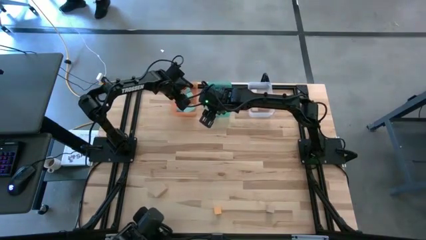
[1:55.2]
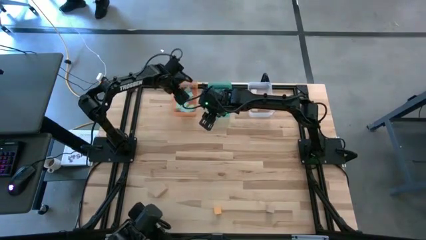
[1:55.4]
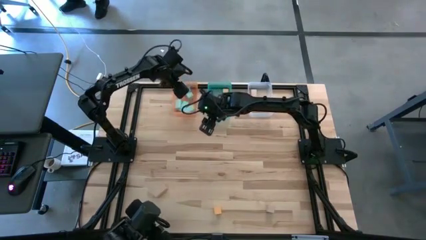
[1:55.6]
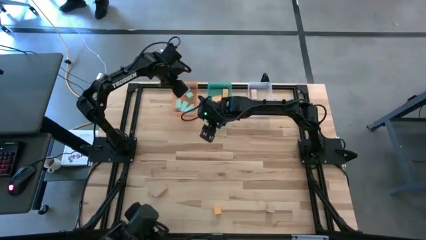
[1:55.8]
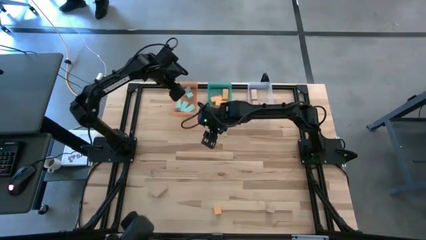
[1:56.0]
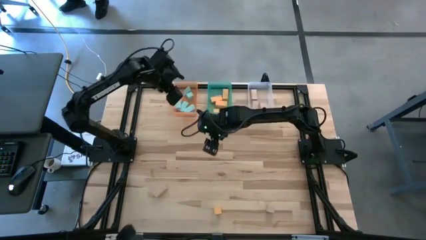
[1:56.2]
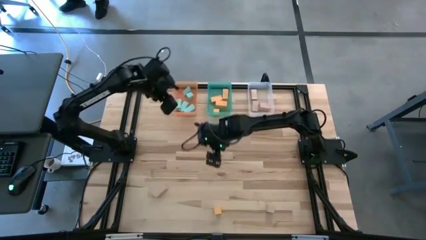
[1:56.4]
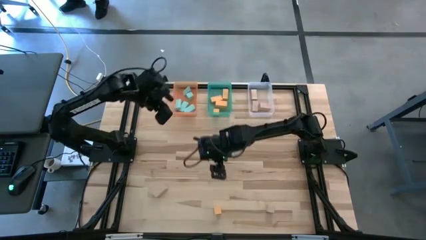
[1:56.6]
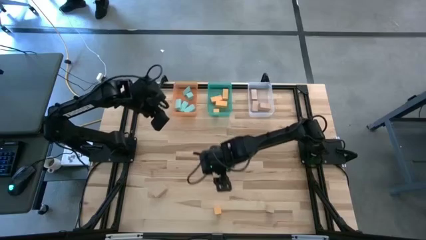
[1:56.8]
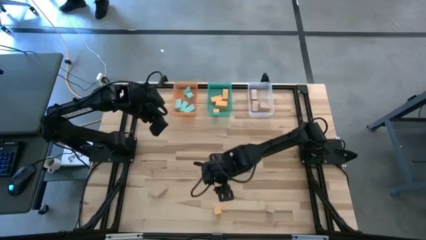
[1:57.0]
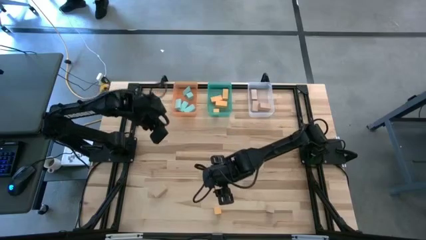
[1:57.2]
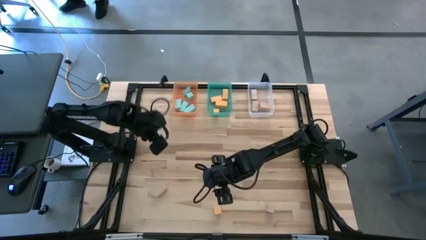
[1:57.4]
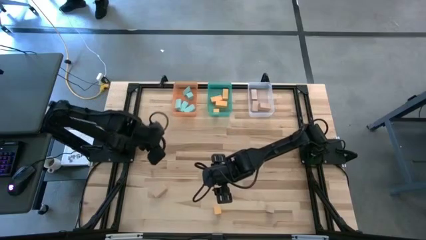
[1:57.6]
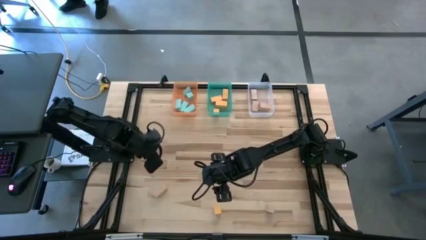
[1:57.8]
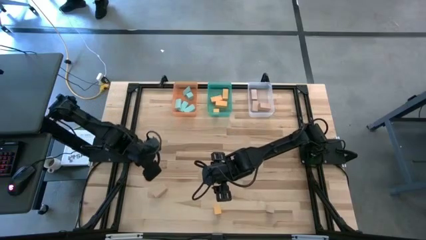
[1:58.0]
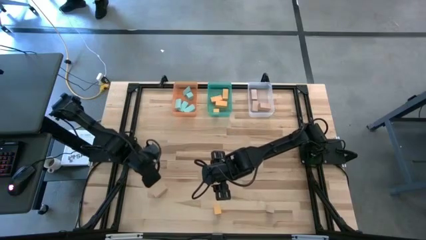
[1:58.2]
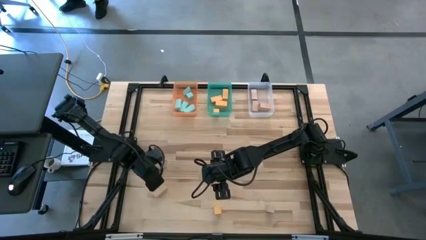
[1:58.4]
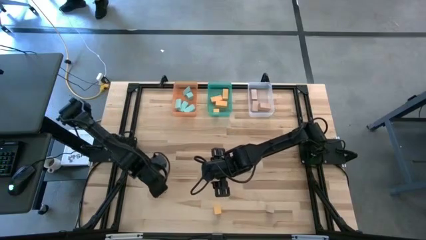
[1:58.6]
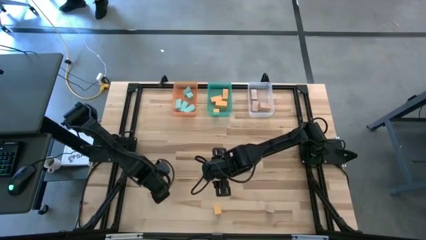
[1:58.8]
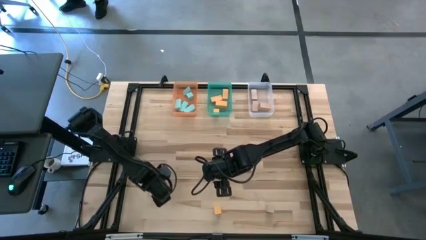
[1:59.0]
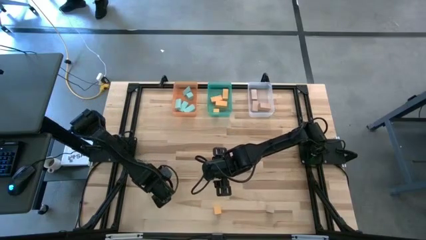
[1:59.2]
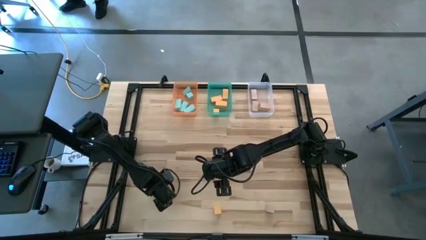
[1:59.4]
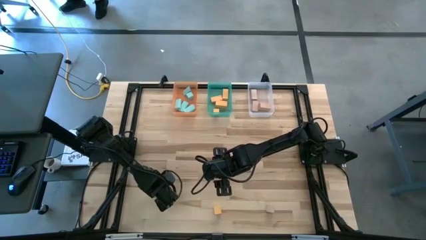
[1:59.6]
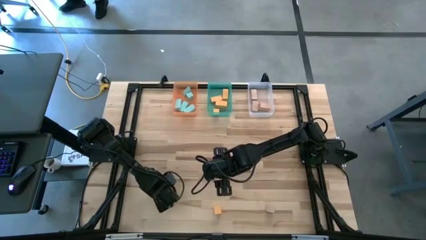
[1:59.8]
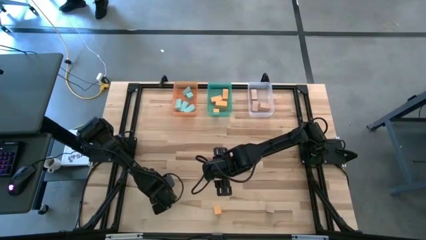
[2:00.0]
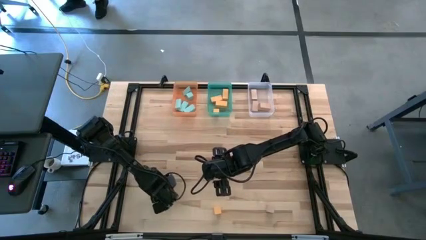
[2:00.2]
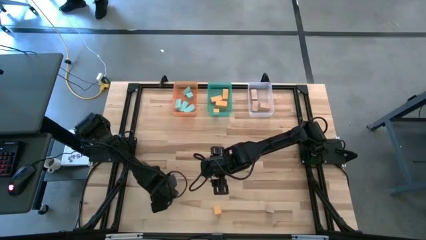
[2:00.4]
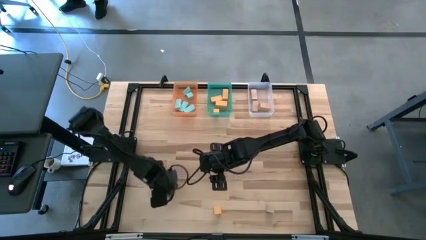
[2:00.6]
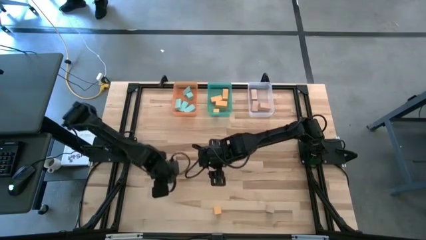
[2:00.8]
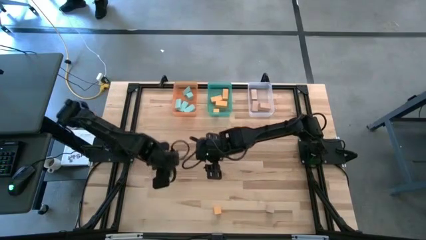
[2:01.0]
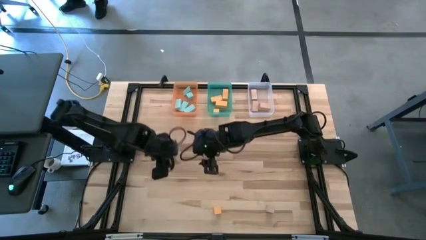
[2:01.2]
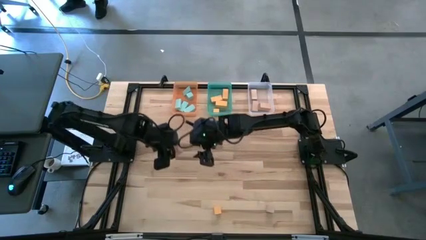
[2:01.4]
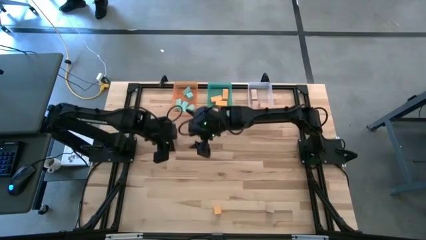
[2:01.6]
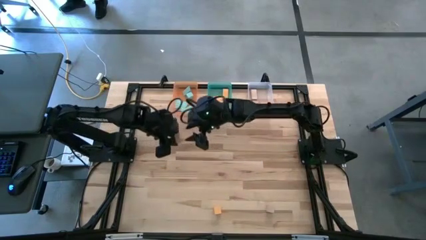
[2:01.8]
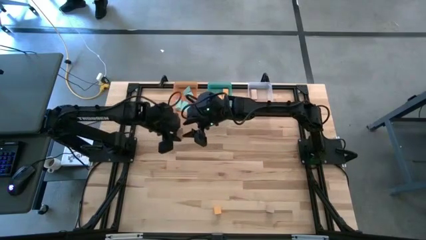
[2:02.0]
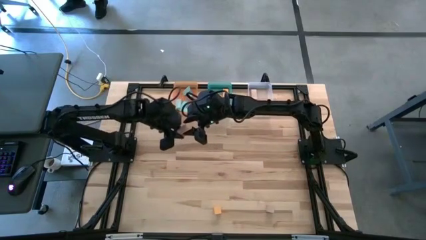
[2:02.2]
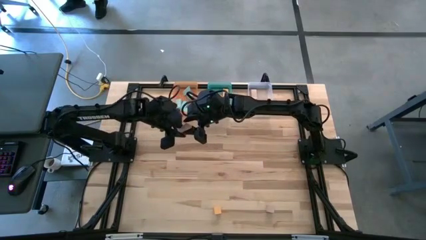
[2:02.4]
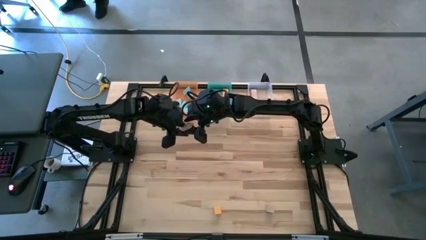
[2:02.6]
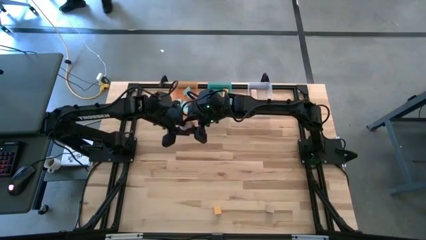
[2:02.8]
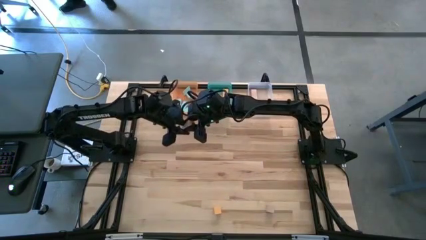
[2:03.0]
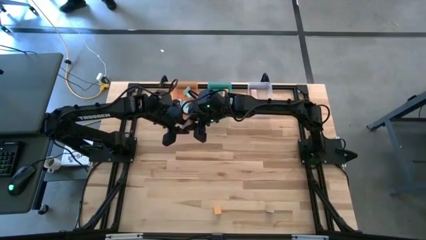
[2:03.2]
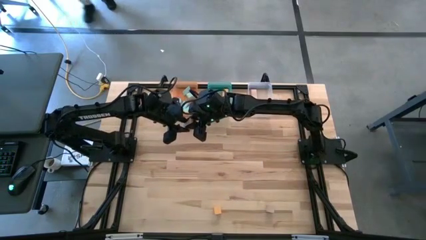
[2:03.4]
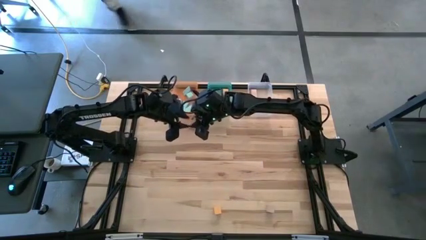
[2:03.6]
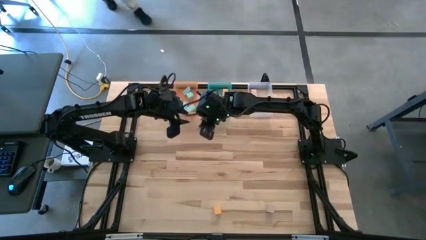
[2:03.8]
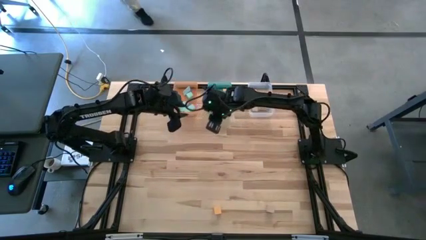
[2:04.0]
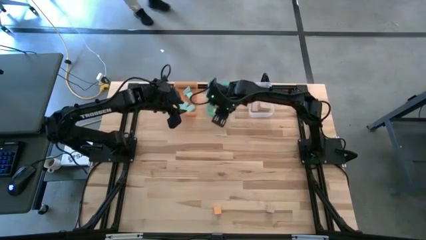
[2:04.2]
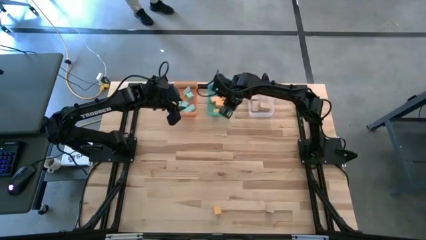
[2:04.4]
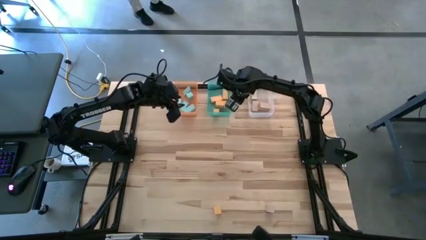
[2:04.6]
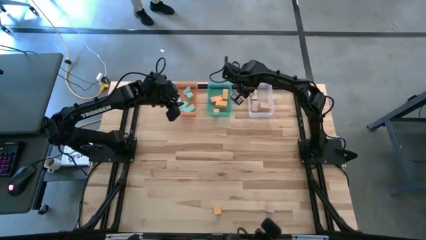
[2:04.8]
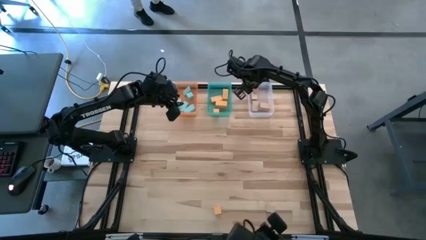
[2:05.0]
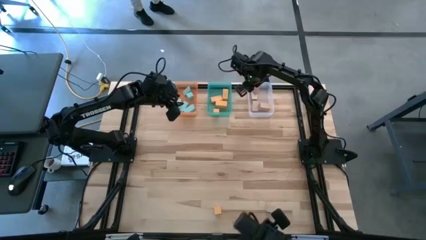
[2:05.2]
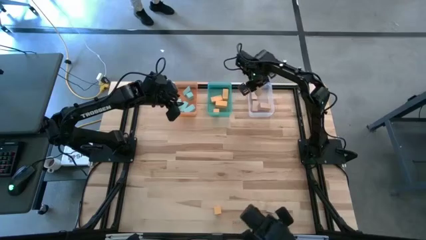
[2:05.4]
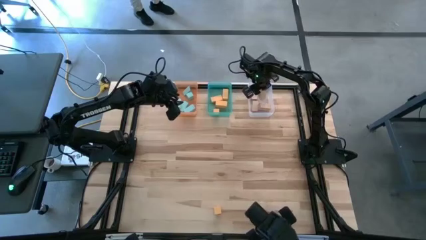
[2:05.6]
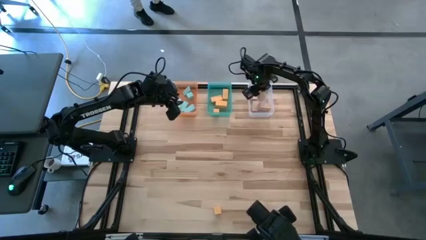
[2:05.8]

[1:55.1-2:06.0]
Task: Sort & place blocks by color
Put the brown block into the transparent bin

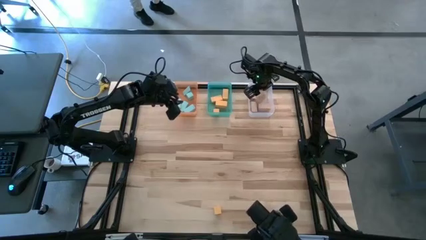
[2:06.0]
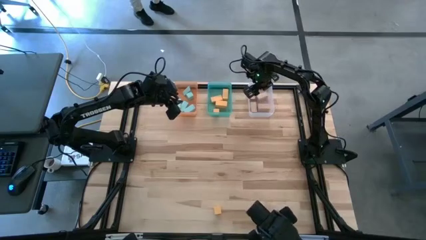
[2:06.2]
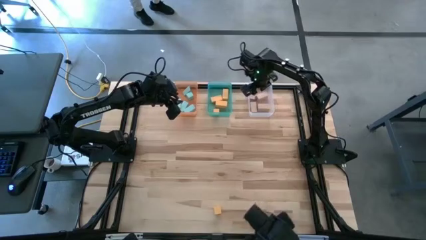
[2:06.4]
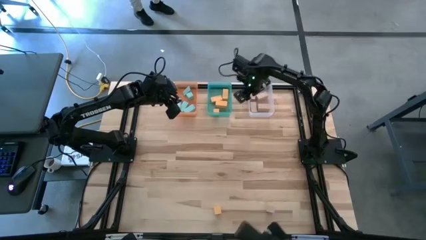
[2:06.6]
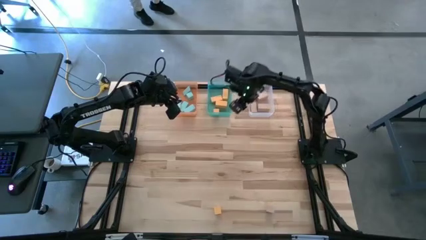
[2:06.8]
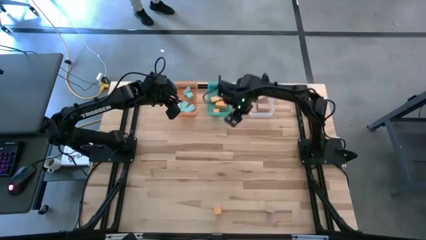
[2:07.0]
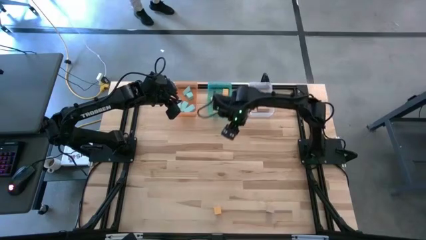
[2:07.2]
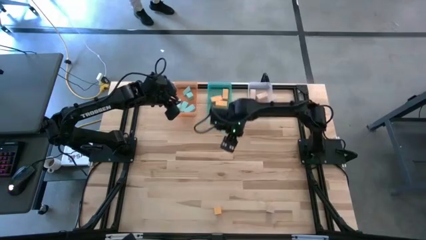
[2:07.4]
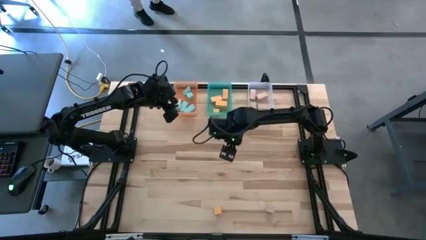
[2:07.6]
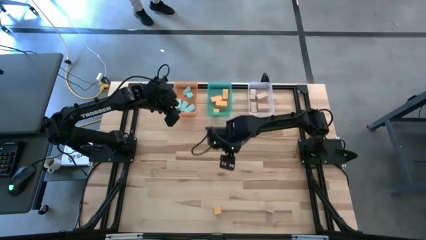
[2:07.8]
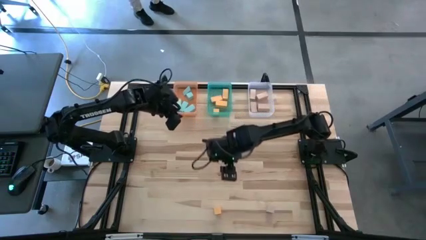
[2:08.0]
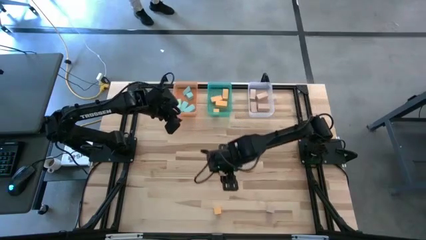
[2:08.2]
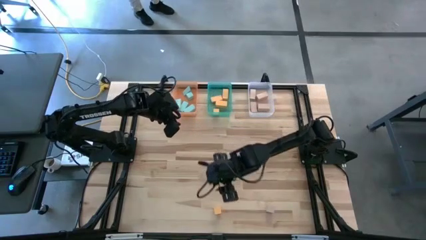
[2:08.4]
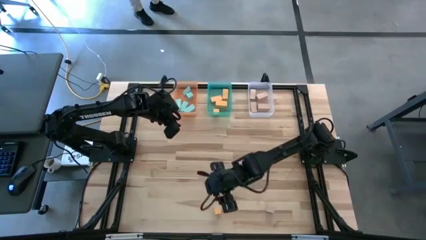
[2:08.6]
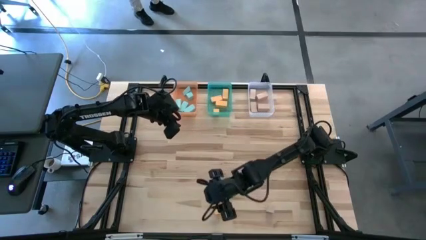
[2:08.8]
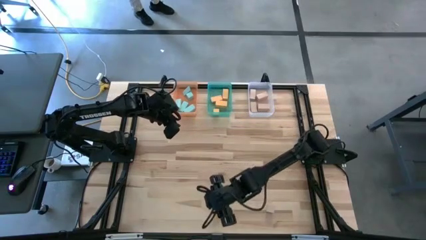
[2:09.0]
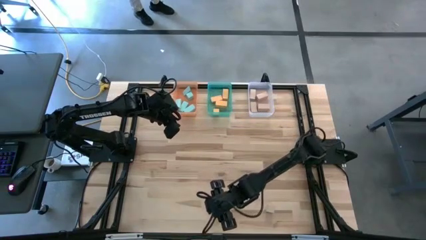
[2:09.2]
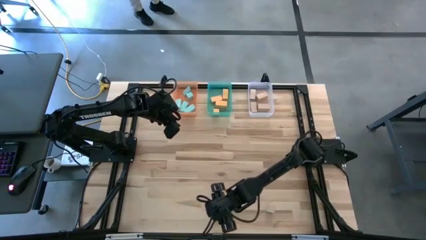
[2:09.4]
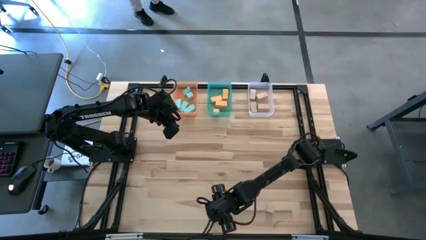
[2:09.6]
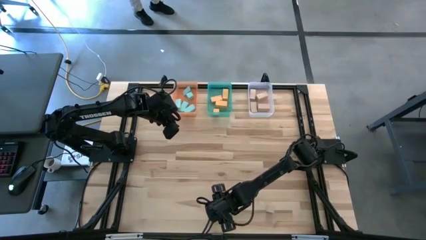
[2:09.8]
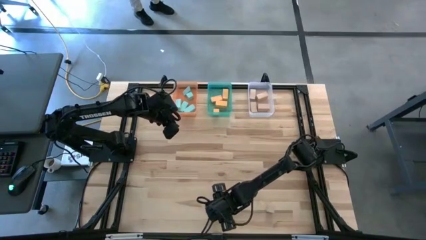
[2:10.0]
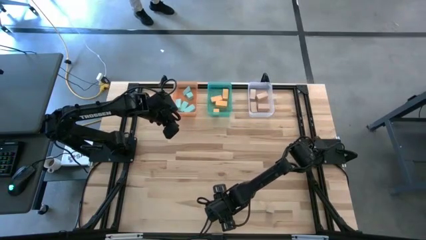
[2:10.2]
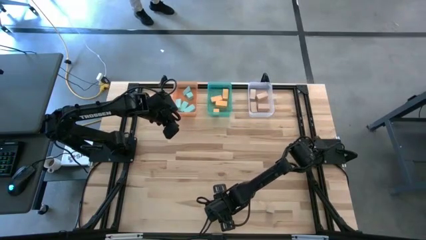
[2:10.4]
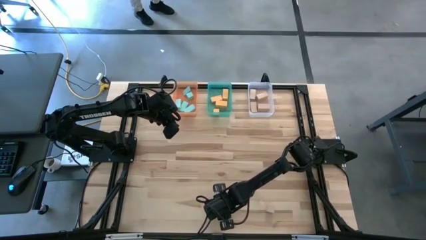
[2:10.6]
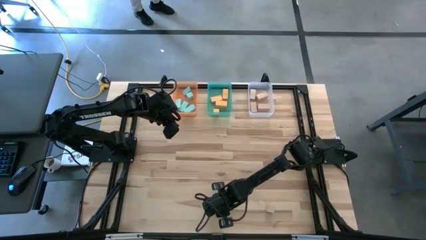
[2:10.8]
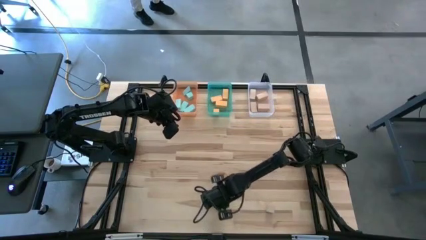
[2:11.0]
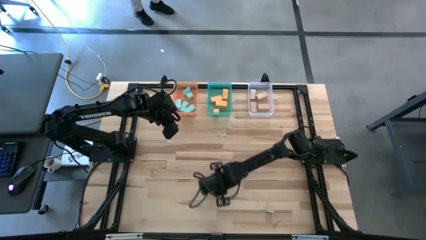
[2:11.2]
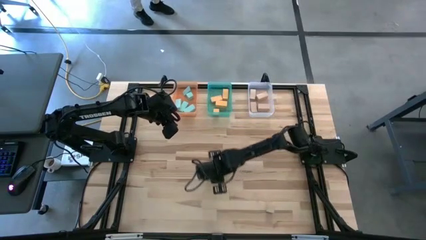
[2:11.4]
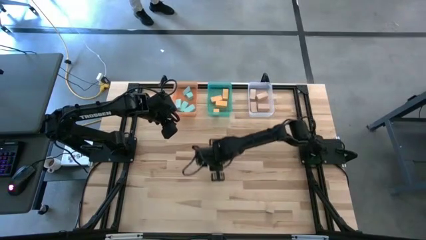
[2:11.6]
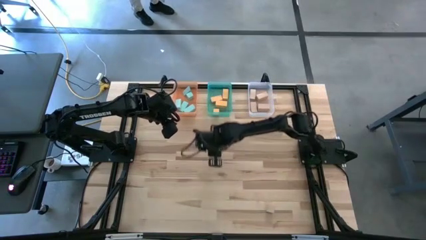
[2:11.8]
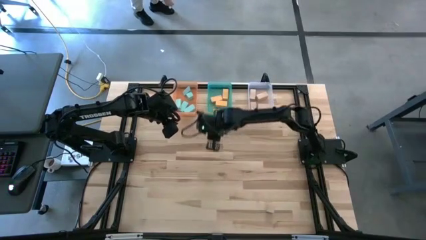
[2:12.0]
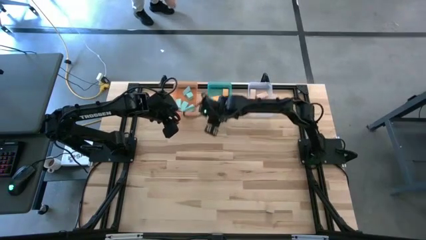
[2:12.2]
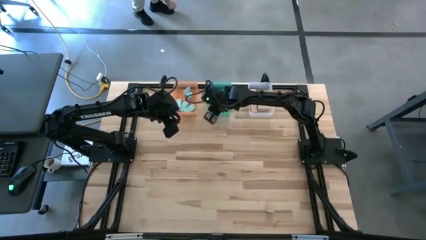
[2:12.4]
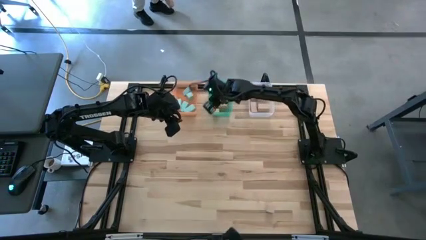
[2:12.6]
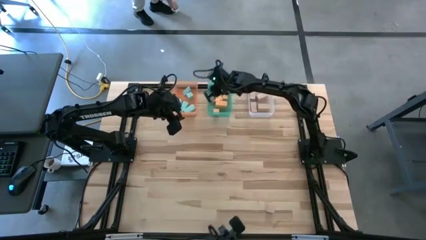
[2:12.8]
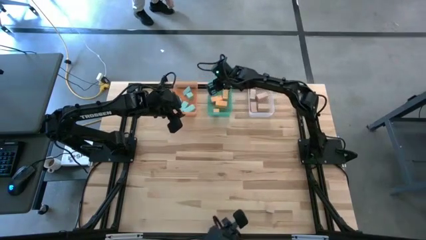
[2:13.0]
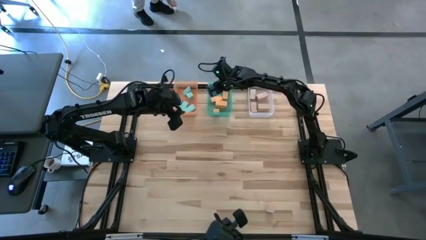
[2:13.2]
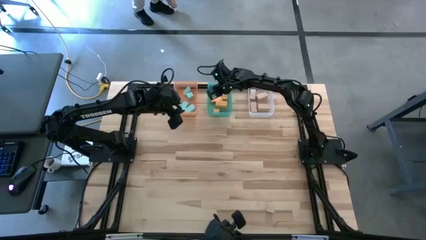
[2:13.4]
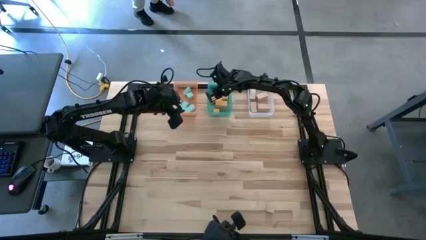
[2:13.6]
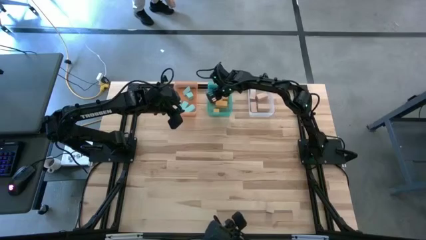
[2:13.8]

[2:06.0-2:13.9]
Put the yellow block into the green bin
